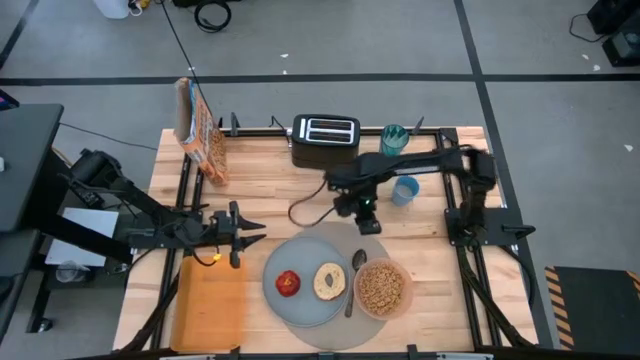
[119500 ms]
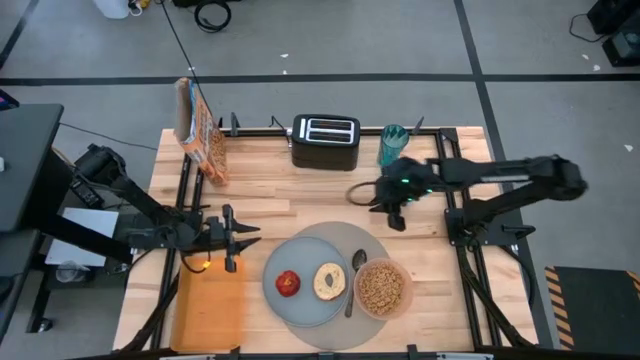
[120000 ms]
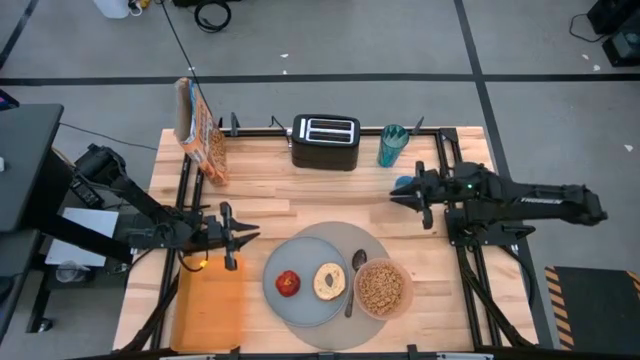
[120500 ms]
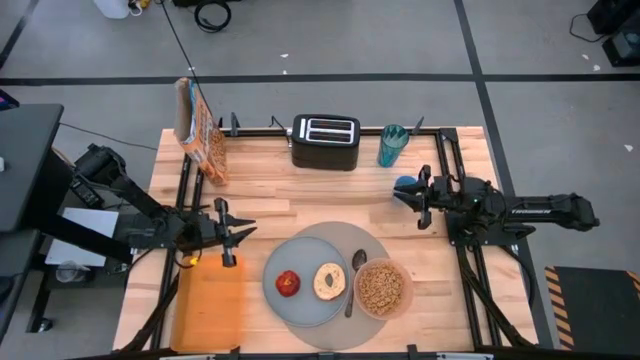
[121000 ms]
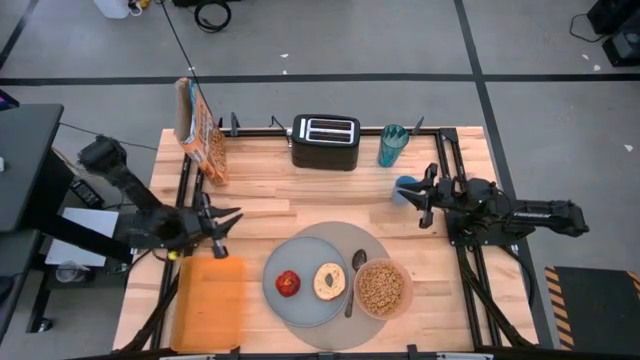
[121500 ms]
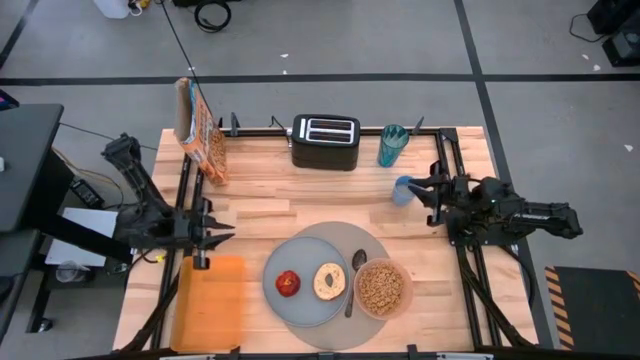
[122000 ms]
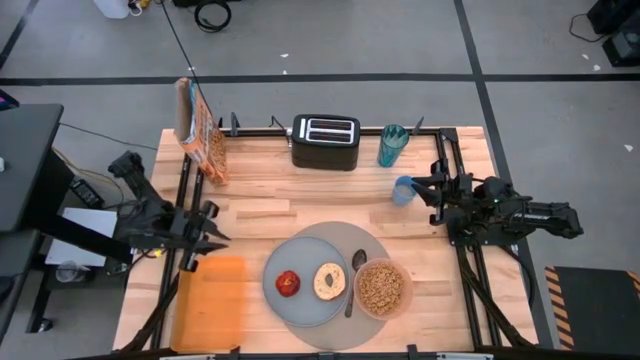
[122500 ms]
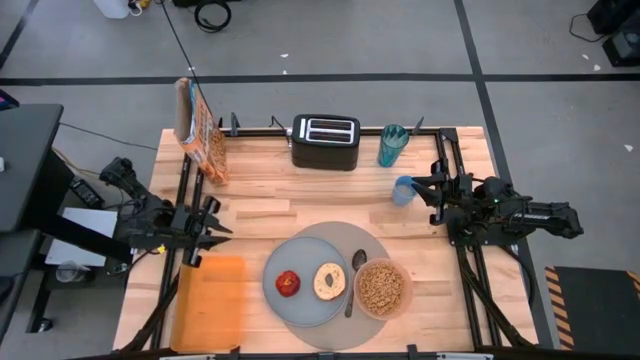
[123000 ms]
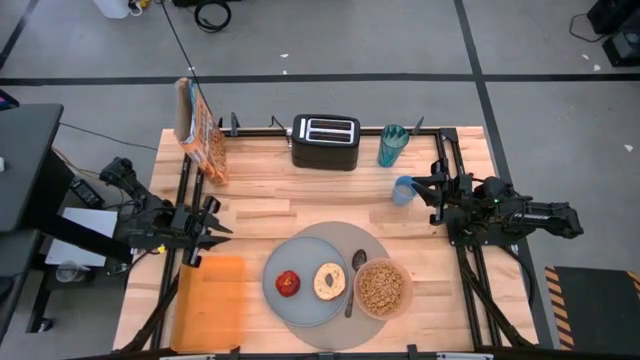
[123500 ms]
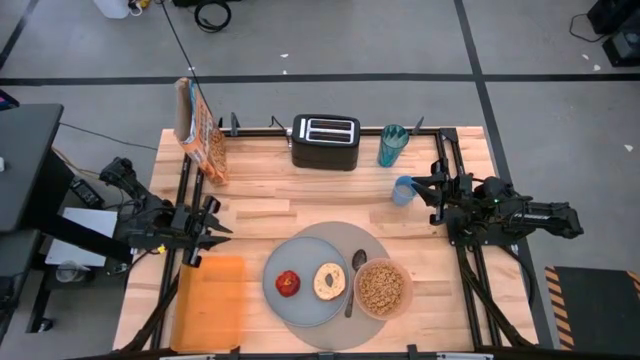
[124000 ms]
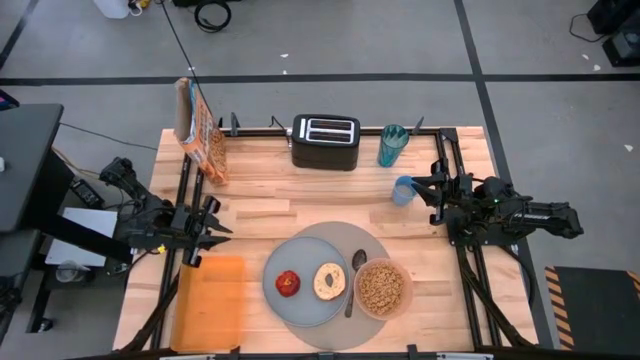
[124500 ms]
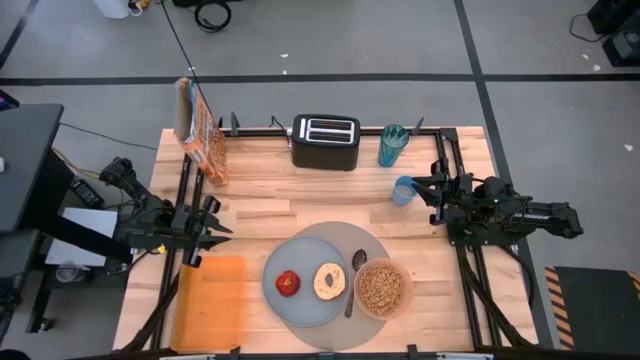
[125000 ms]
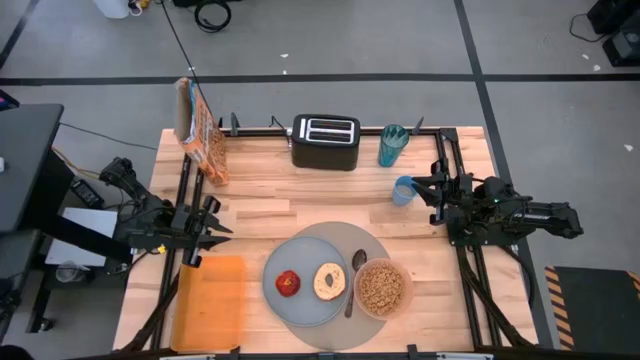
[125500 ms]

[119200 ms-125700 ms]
Task: Arrange a breakfast setting
Return to Home Position

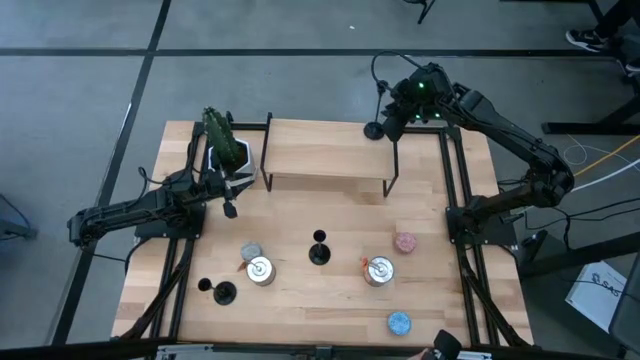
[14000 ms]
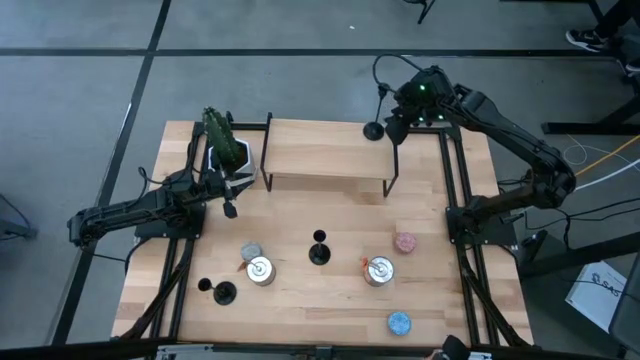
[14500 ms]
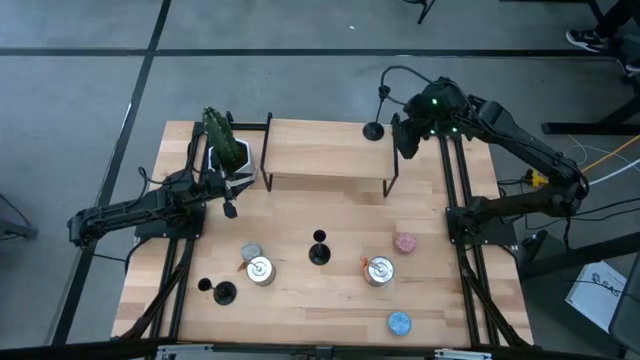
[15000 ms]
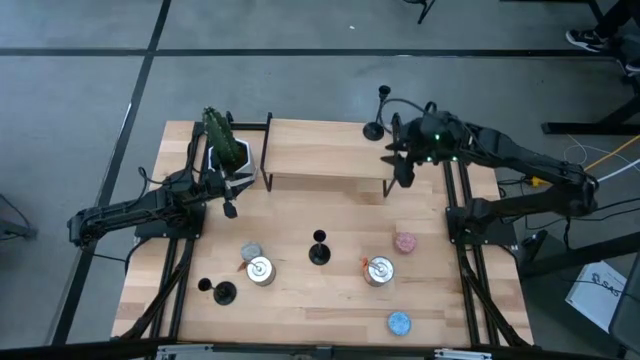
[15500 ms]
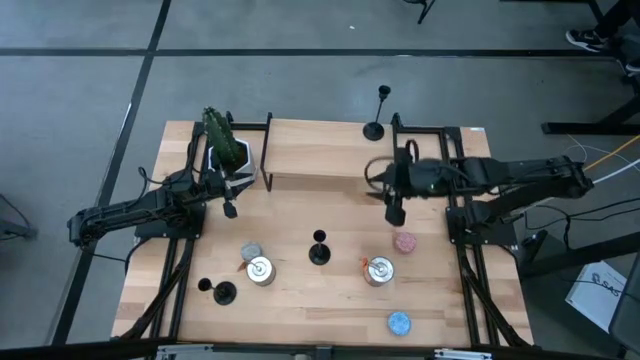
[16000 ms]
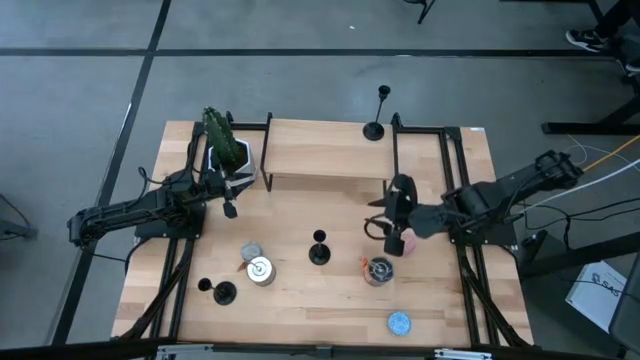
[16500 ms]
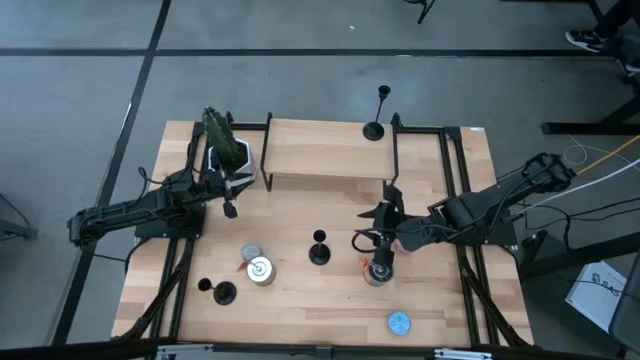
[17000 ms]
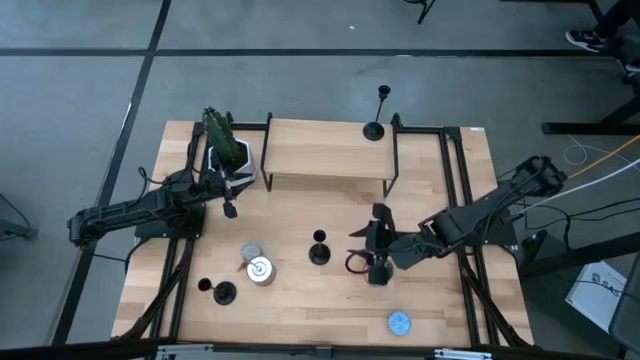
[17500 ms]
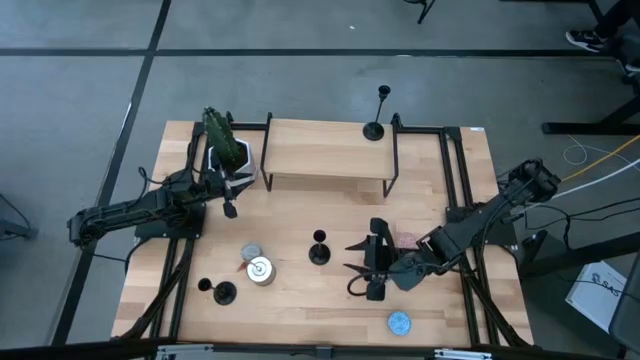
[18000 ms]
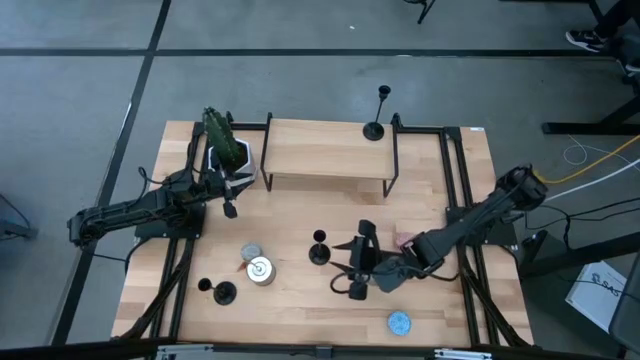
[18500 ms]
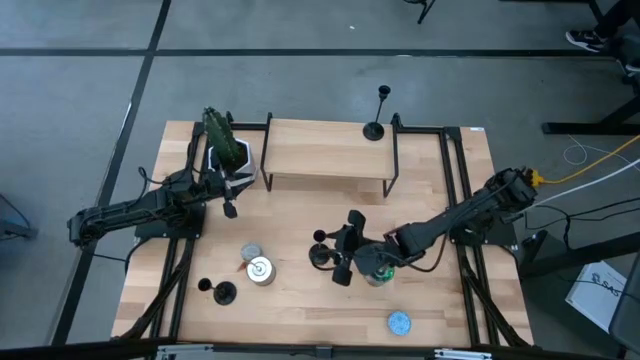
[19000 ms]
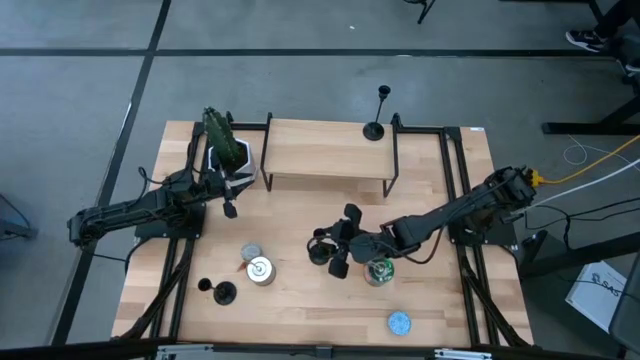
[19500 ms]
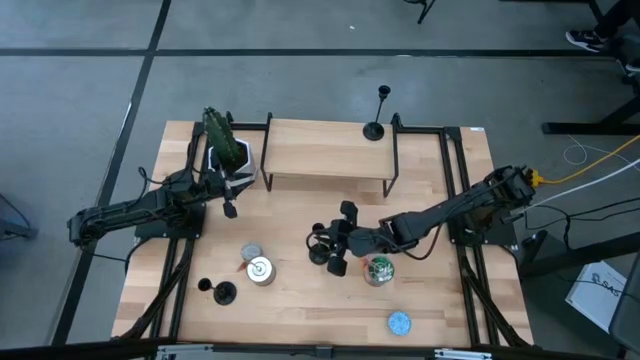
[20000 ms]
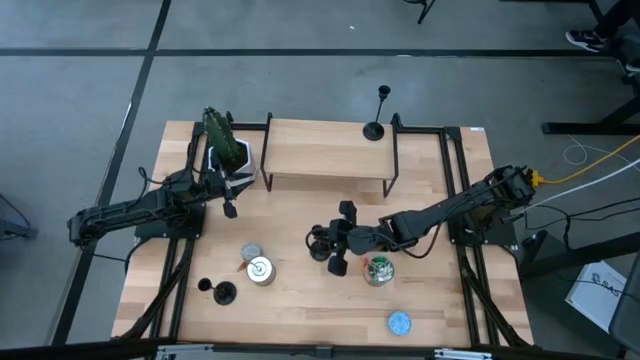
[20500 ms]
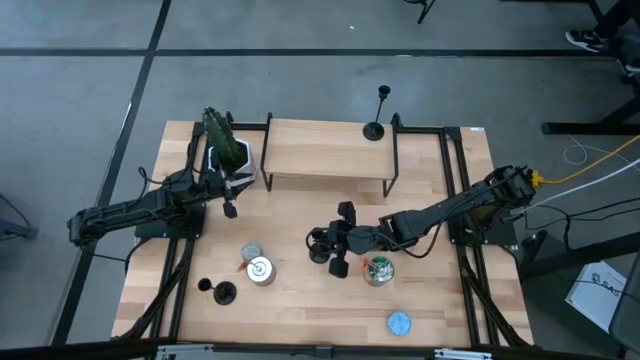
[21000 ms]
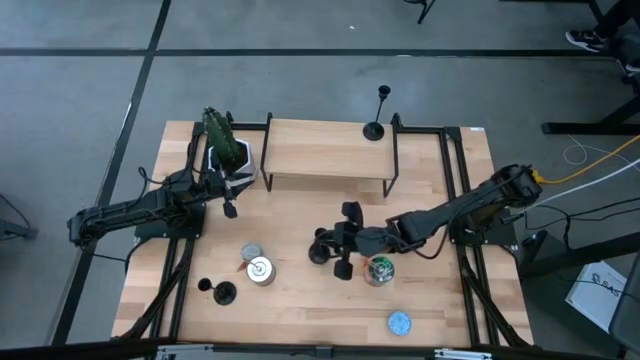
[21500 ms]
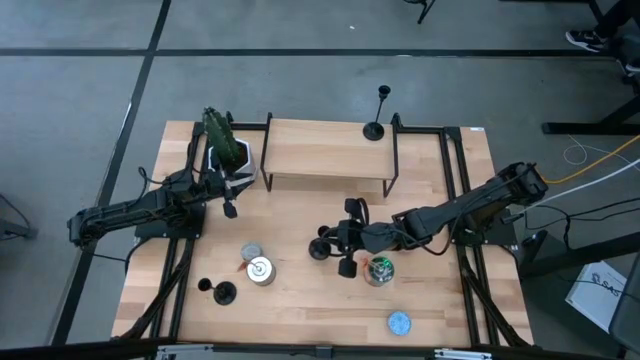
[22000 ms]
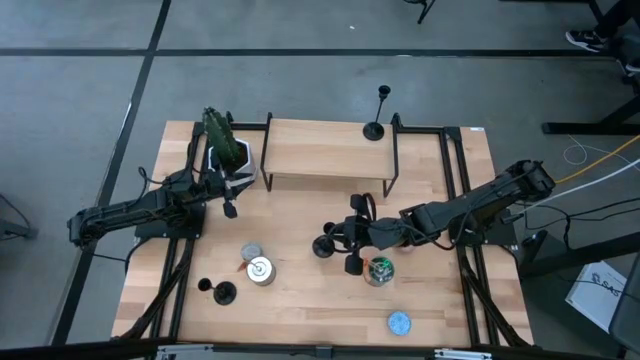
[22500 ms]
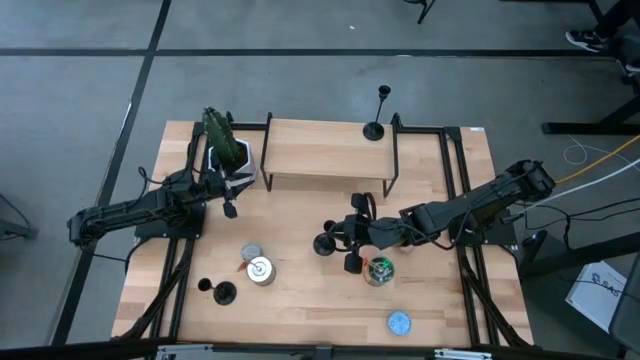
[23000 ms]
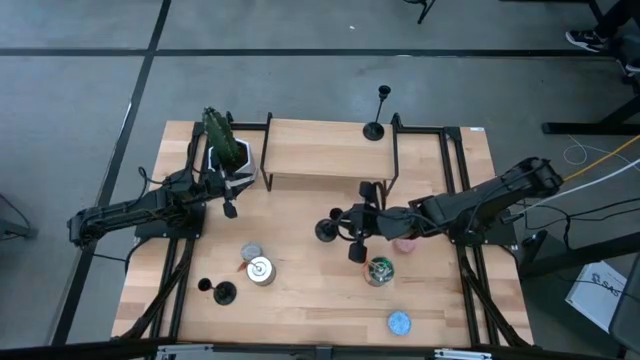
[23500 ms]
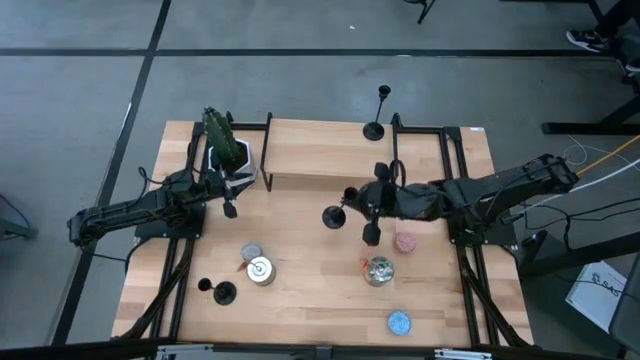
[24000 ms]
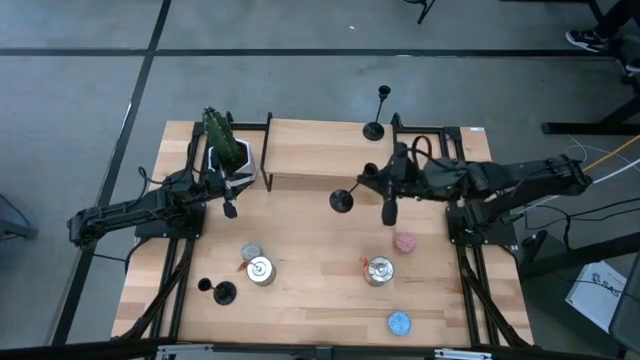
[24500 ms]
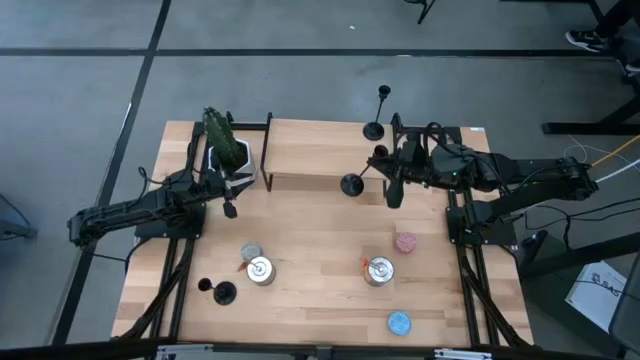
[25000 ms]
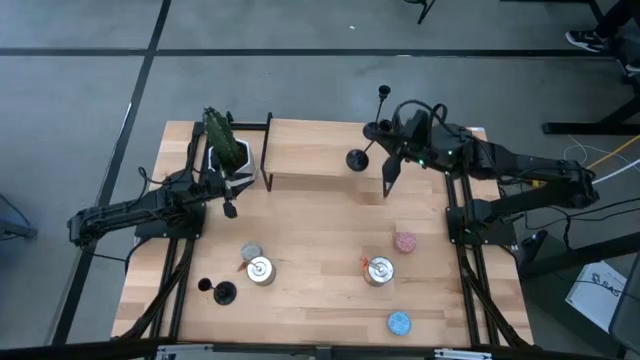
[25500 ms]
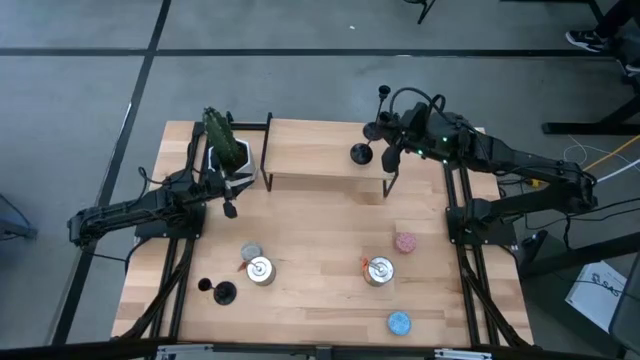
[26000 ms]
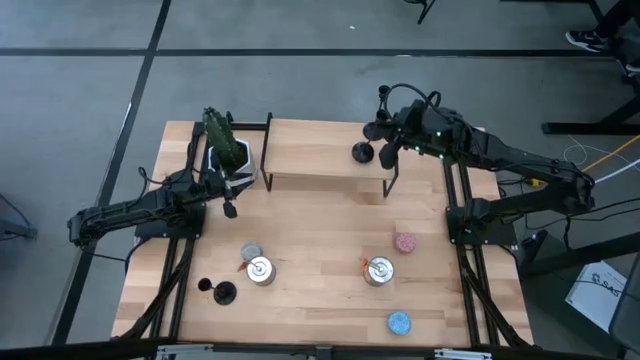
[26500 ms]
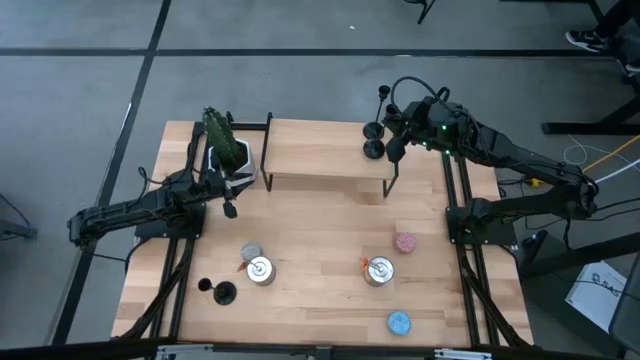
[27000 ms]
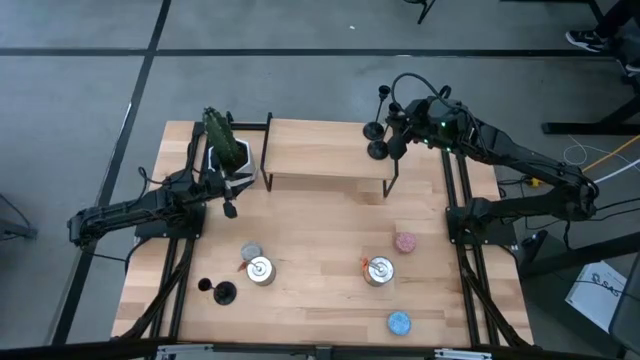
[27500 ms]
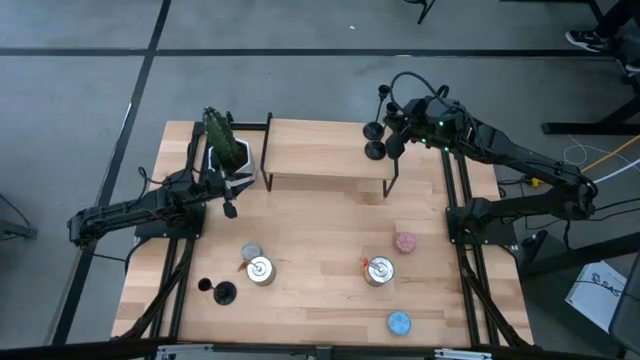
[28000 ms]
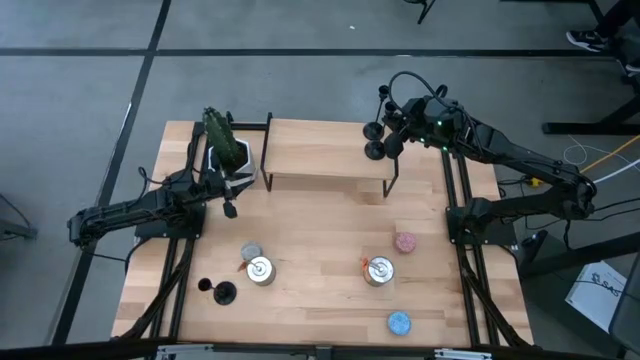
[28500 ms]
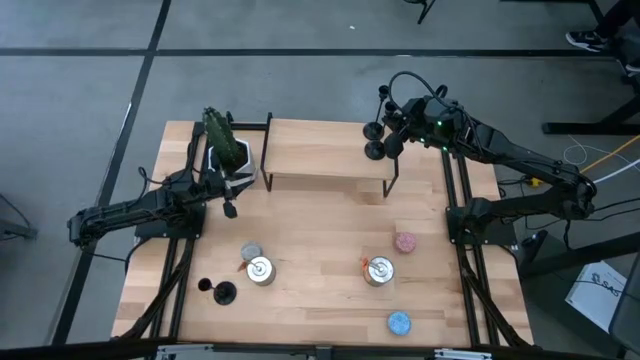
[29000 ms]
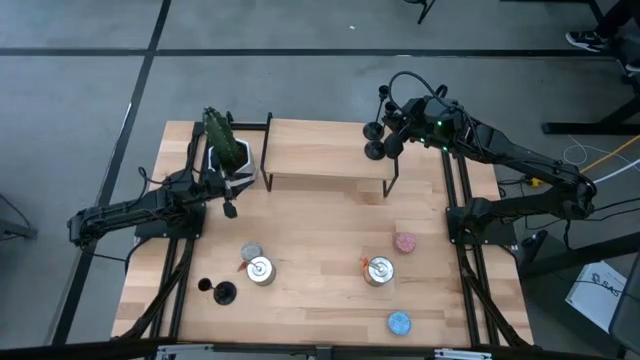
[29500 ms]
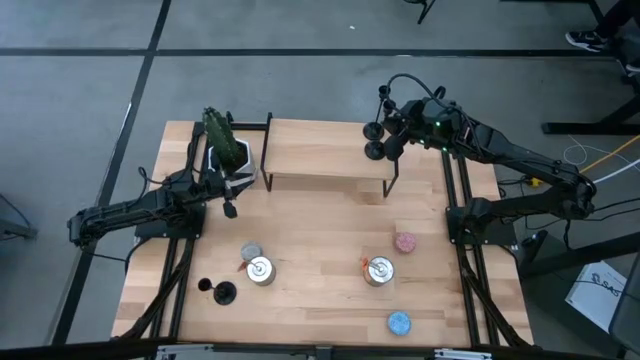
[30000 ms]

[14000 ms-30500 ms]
Task: Pick & Place candle stick holders
Align the right black candle holder with the other black candle holder on the shelf
